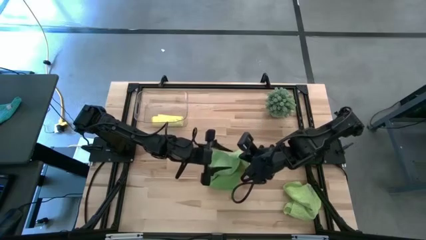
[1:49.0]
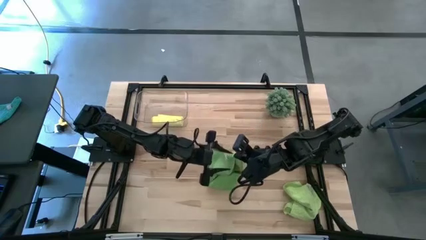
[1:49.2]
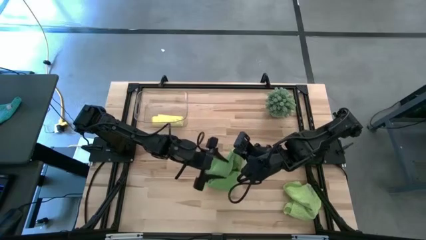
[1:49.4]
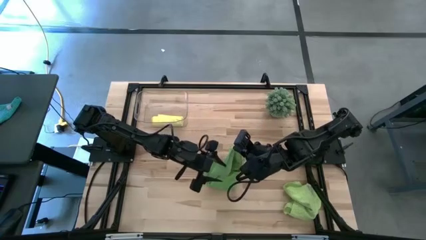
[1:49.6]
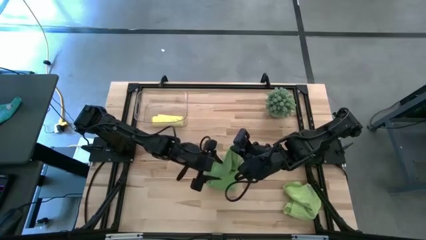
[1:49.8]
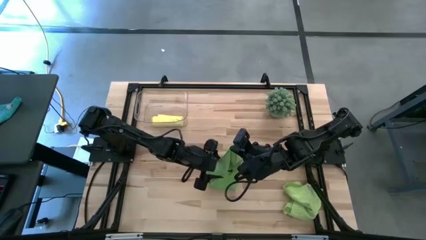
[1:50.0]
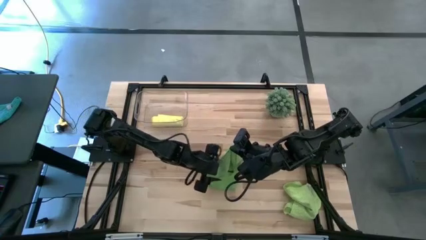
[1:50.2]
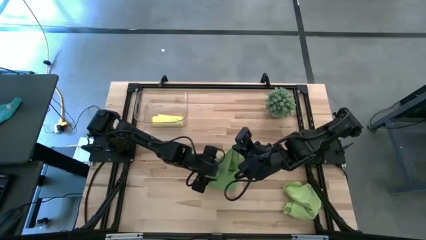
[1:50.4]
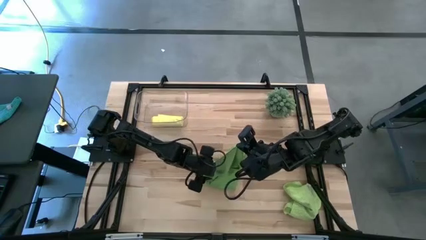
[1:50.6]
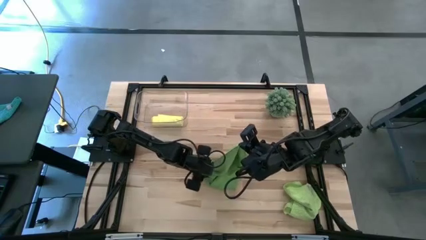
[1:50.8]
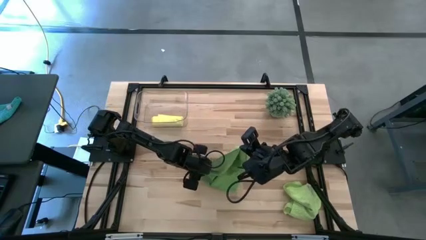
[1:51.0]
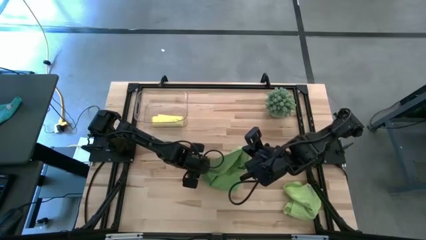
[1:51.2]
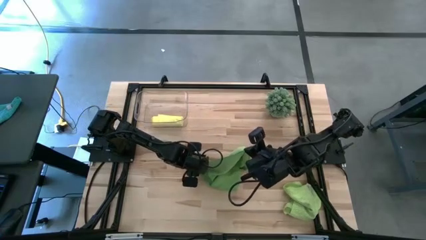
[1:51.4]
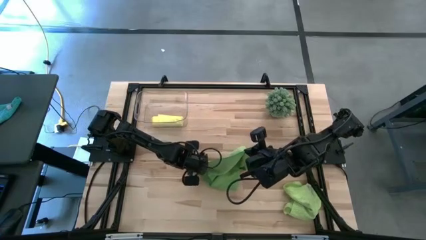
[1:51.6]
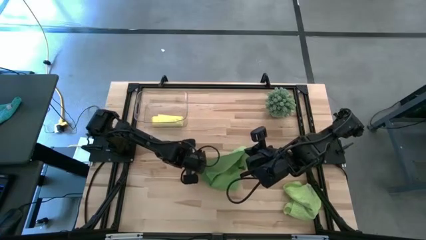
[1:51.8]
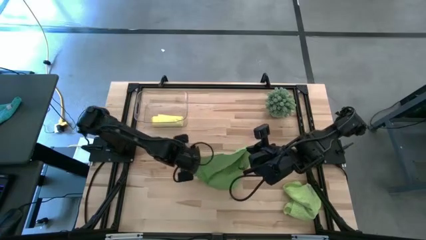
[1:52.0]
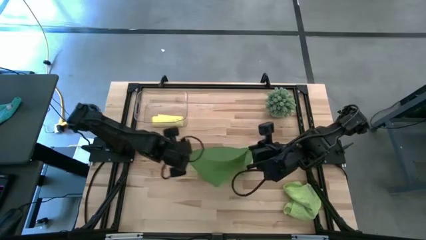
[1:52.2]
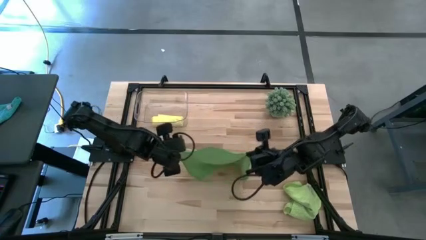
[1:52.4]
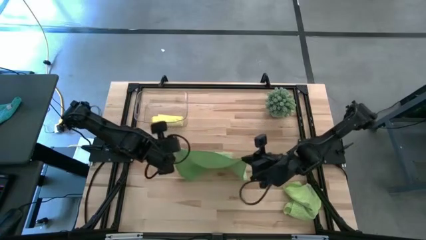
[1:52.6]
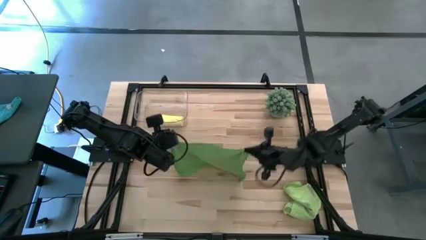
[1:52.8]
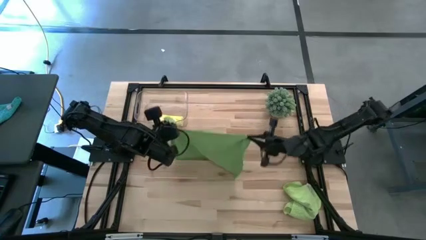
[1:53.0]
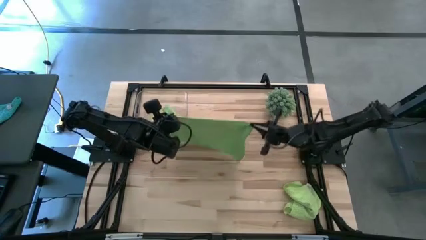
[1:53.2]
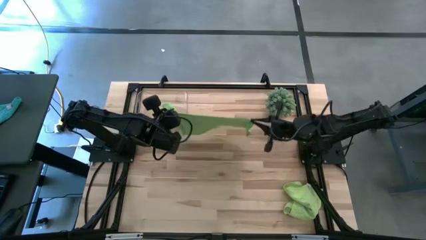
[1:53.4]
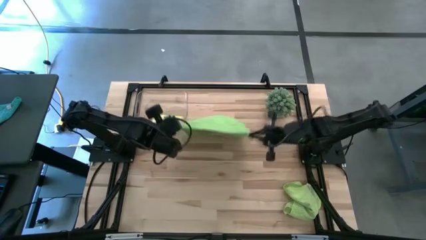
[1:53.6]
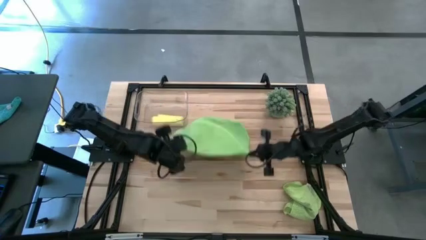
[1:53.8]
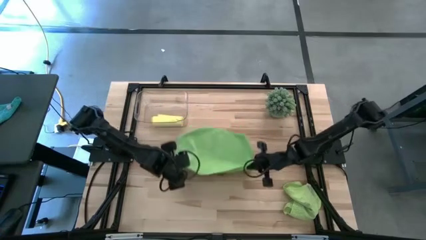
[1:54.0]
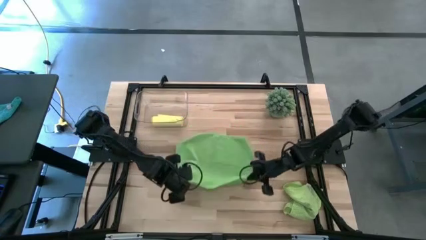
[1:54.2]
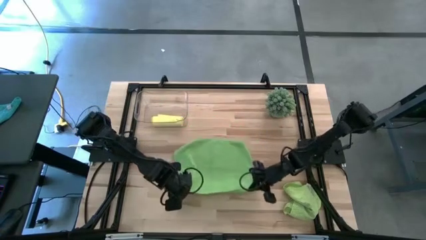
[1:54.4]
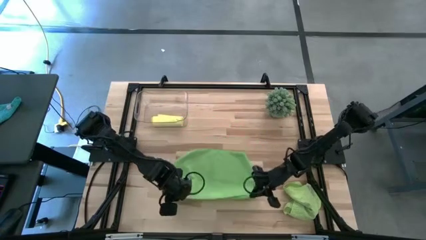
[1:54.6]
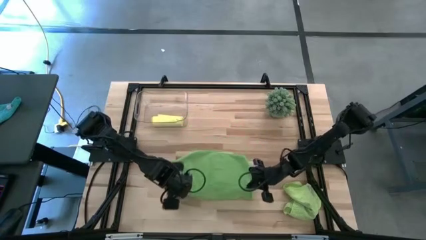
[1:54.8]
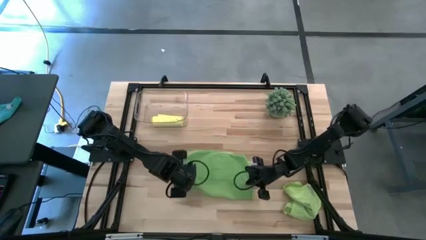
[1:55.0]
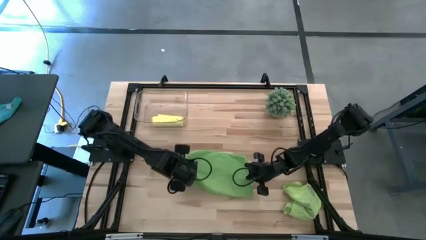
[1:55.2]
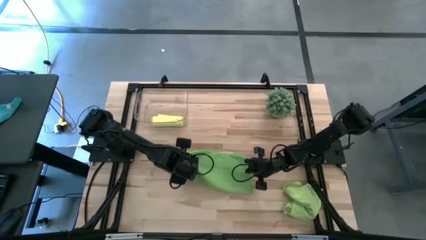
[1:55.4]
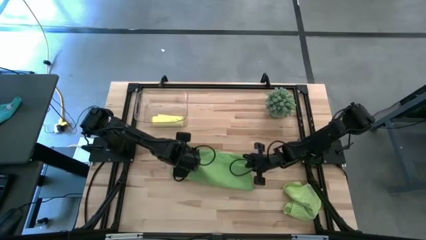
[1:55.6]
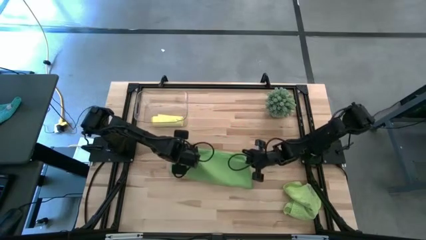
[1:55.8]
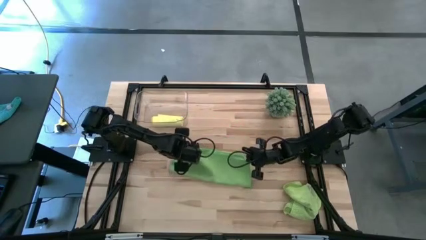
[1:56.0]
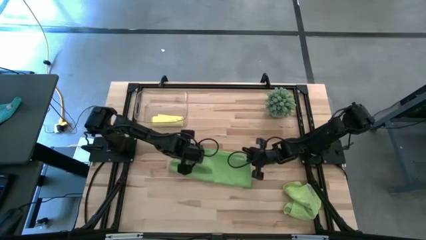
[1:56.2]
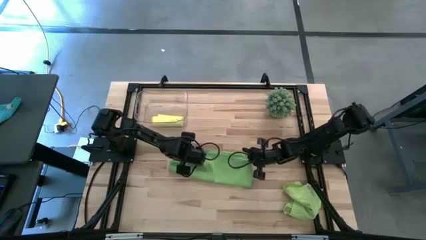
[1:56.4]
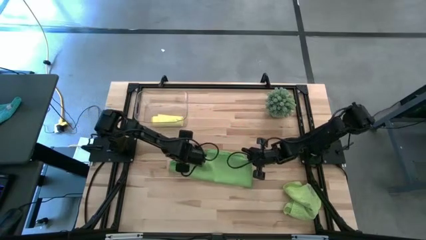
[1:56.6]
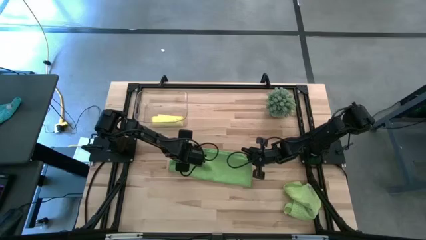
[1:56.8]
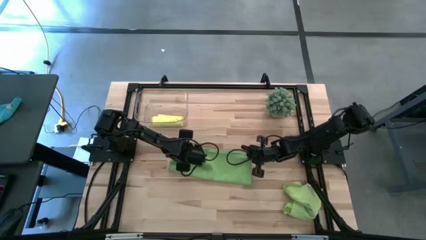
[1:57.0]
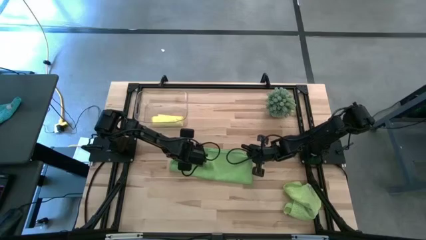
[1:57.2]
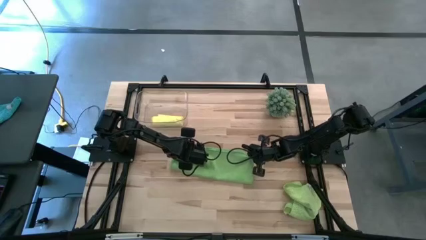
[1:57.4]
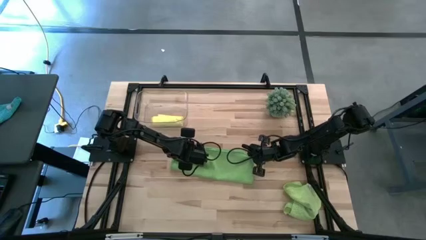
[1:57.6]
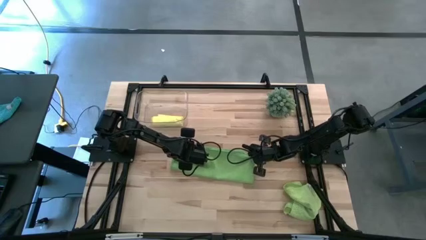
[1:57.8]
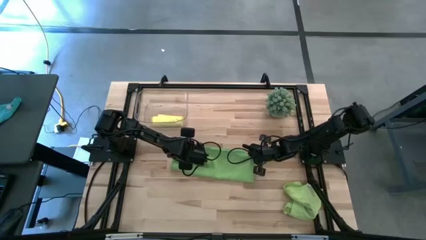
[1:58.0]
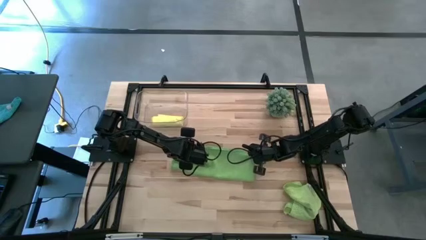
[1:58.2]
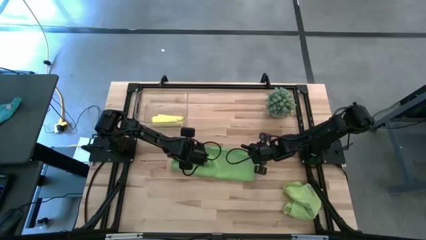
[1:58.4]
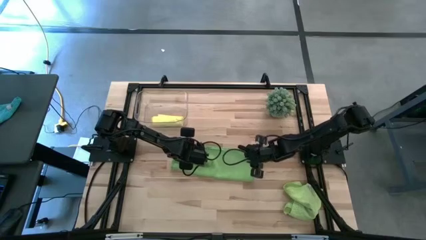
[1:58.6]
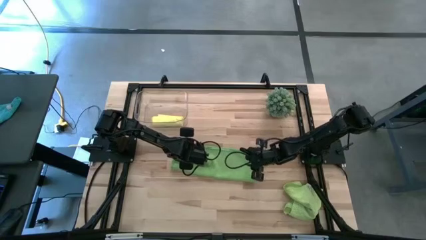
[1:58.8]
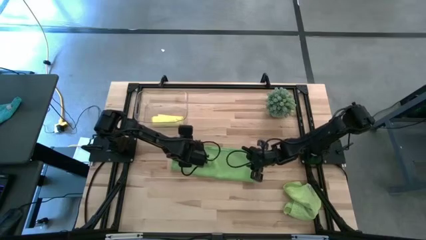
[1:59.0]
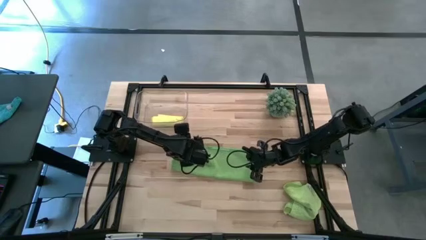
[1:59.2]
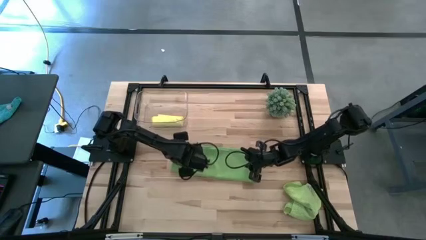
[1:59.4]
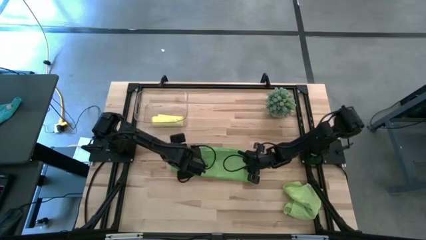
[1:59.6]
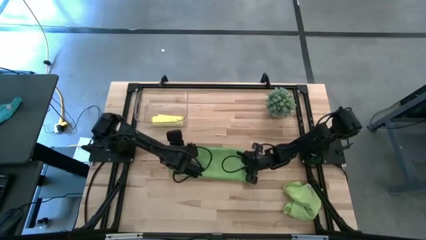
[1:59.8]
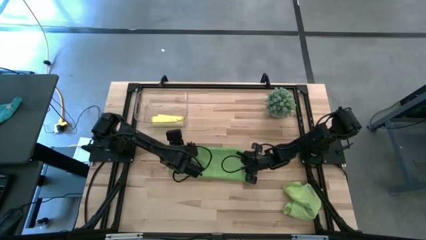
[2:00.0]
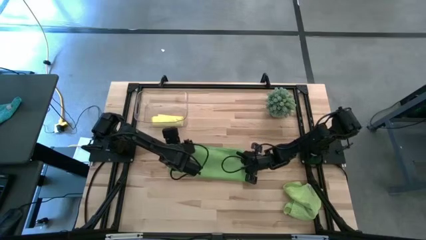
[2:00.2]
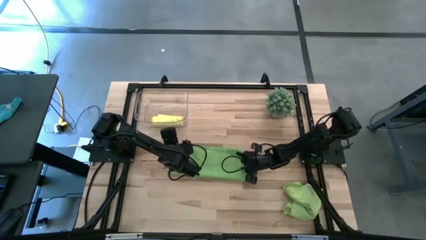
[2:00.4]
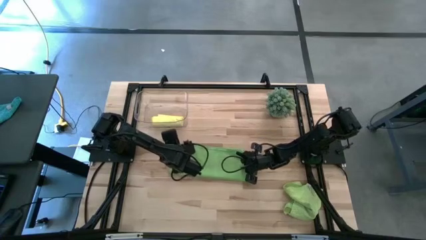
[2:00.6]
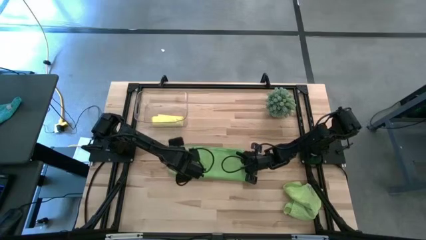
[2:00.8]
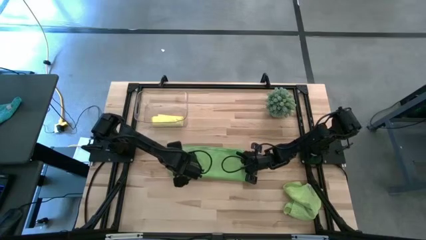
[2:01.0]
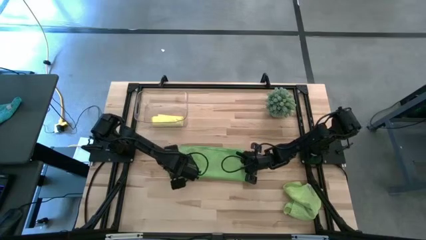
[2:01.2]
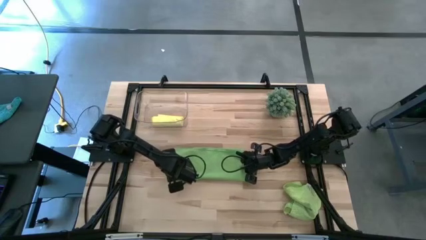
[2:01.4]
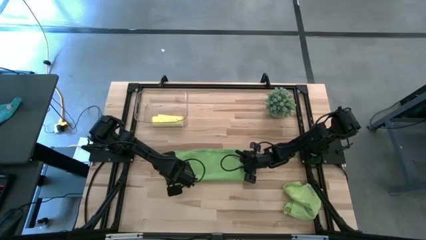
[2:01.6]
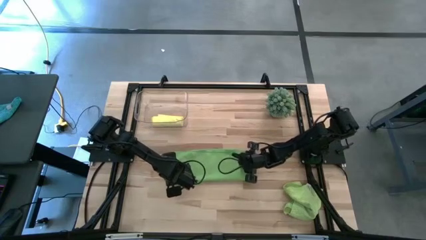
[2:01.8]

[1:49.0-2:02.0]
Task: Roll microfiber towels into tight, uniform cylinder then place into a basket
Fold the green microfiber cloth

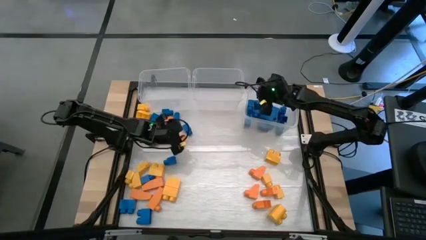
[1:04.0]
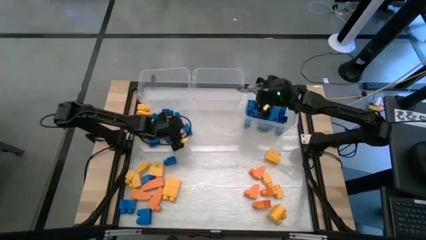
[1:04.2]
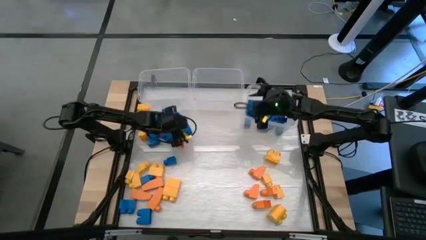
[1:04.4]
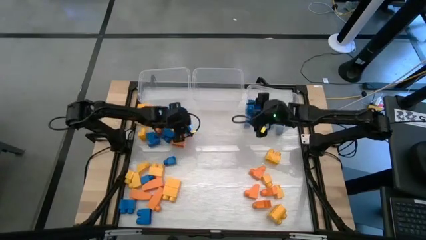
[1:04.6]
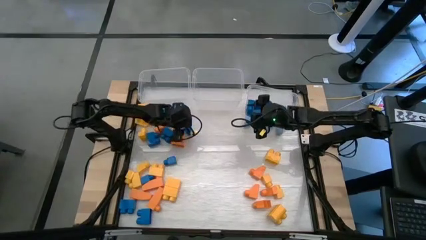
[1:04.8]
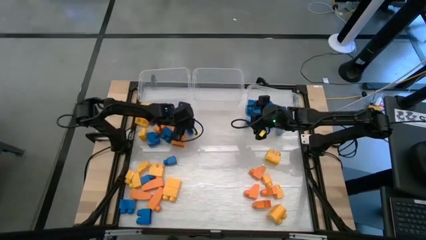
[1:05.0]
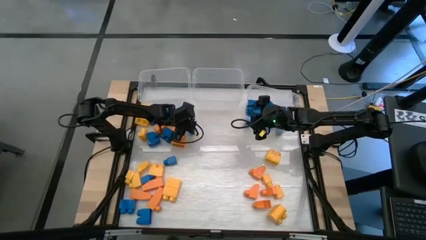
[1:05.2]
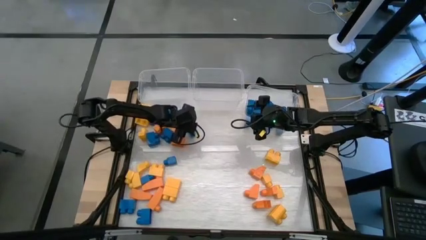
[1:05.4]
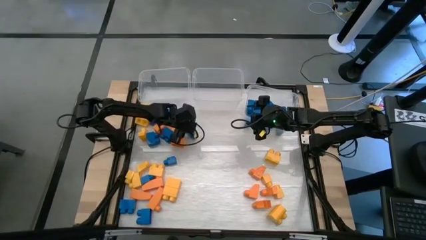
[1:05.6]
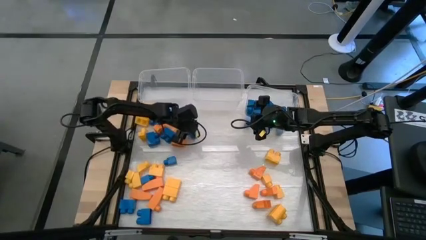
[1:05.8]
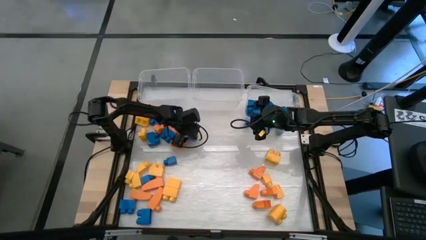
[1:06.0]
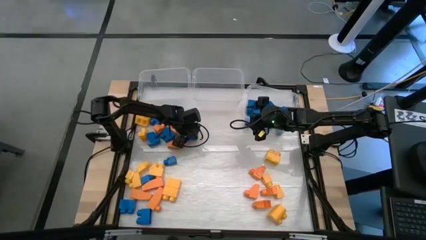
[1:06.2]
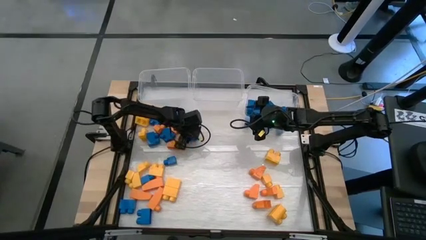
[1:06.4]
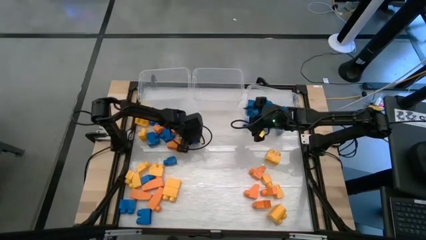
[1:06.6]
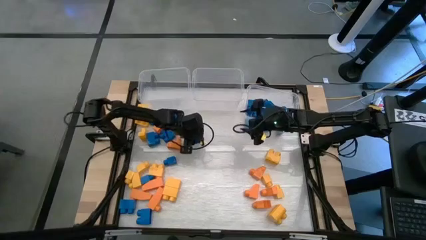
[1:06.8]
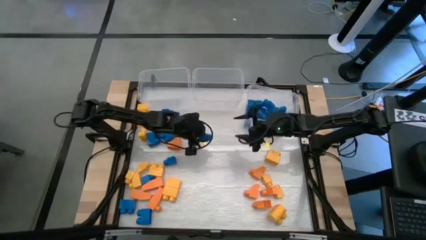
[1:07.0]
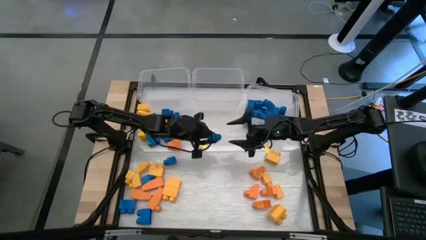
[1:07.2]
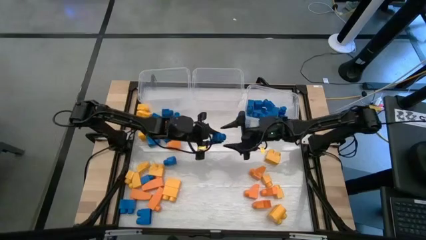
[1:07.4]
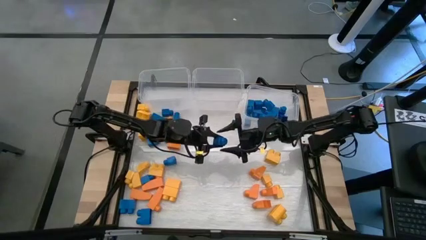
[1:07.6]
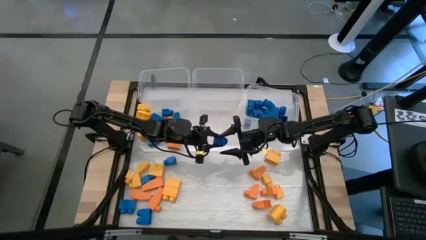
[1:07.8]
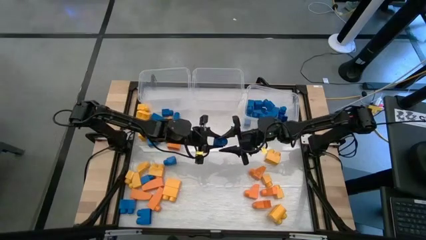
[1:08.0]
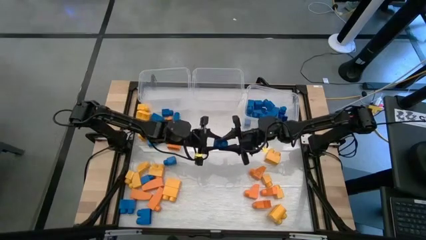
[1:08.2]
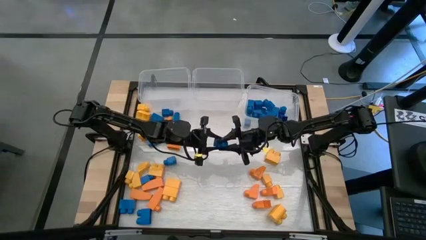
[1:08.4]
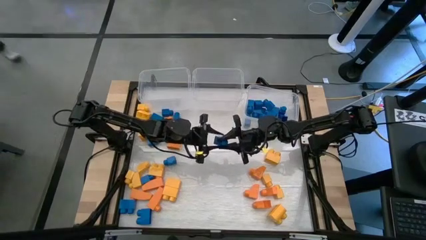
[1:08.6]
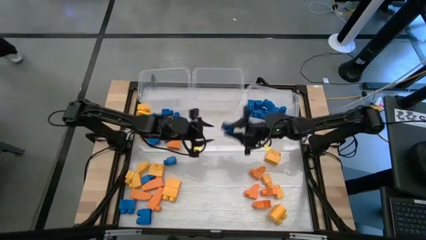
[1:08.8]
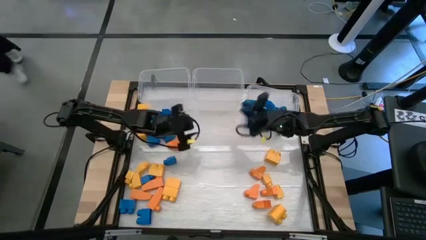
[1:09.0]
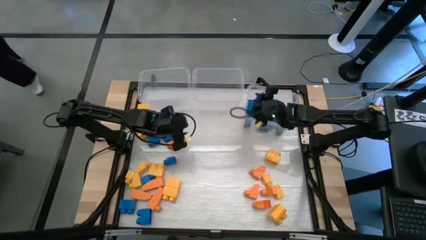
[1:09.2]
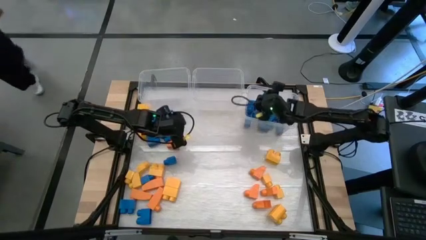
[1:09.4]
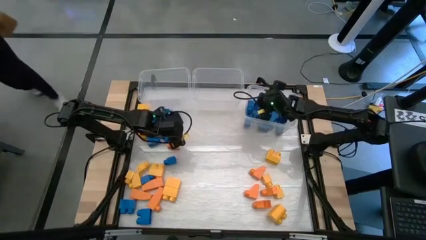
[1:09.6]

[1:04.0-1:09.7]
Task: Sort blocks
Put the blue game piece into the right transparent bin
